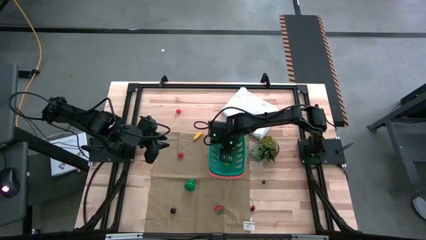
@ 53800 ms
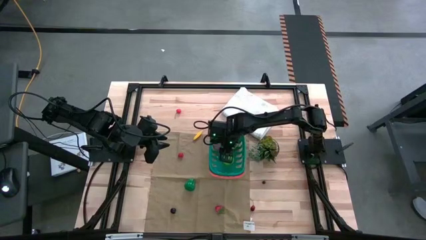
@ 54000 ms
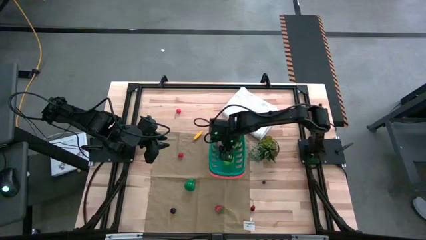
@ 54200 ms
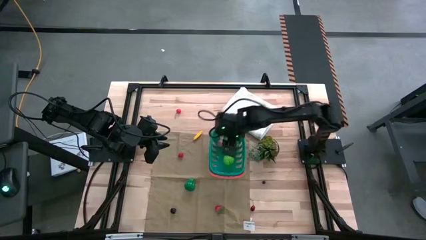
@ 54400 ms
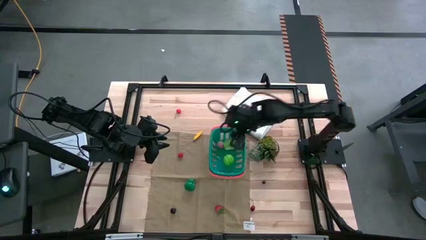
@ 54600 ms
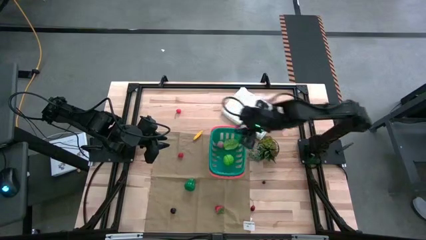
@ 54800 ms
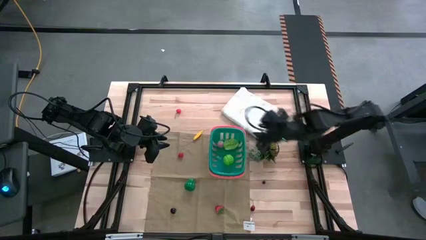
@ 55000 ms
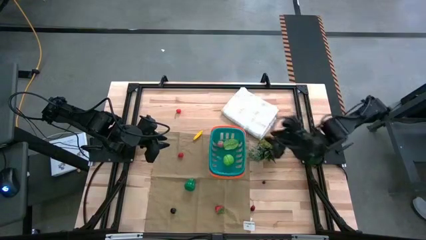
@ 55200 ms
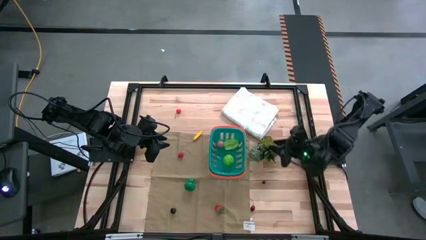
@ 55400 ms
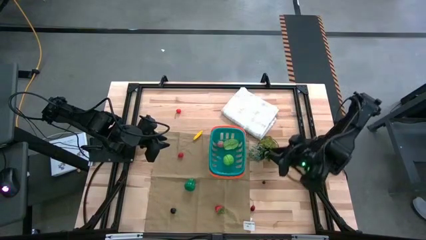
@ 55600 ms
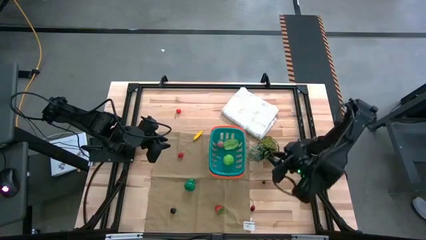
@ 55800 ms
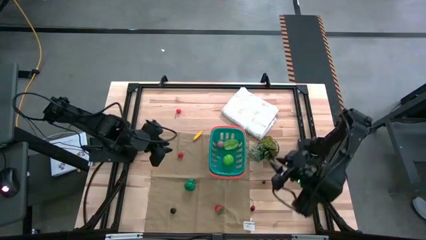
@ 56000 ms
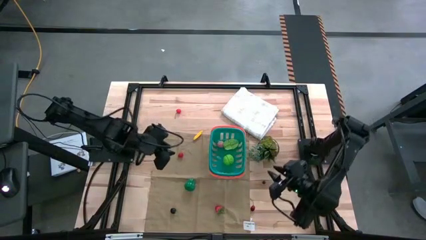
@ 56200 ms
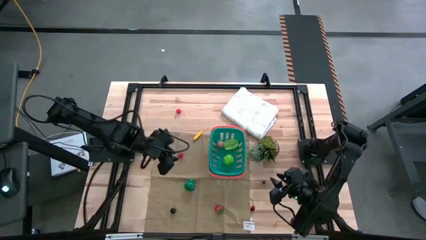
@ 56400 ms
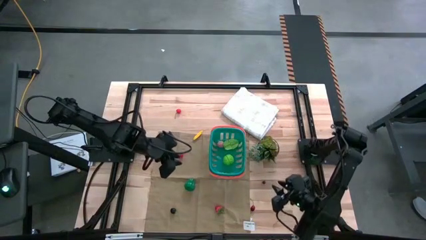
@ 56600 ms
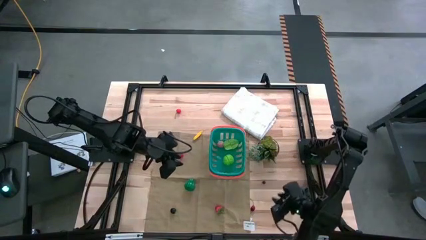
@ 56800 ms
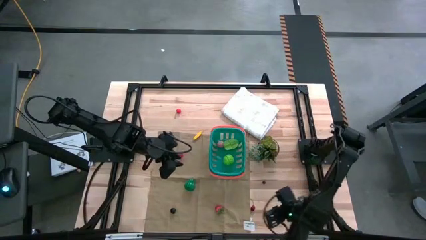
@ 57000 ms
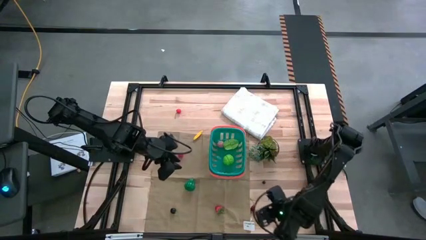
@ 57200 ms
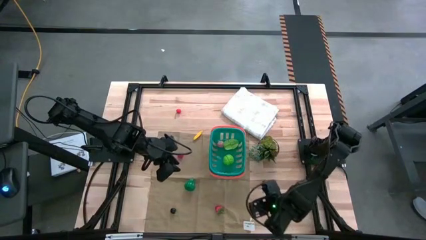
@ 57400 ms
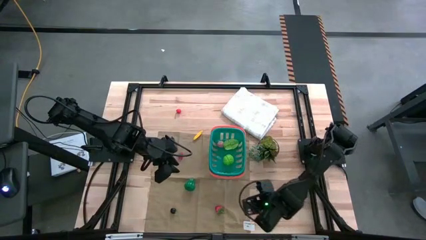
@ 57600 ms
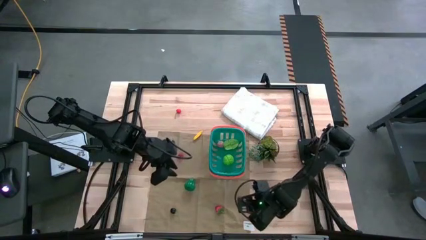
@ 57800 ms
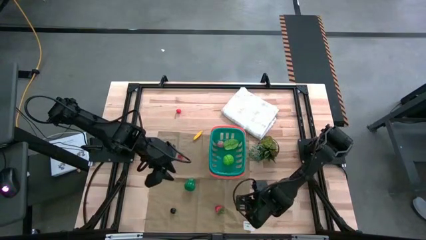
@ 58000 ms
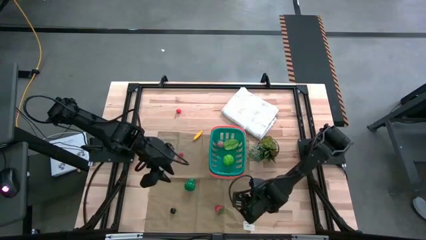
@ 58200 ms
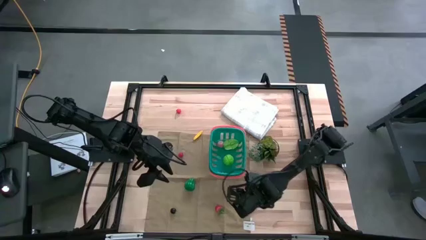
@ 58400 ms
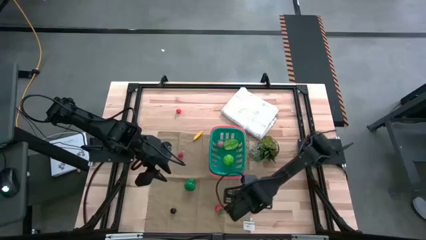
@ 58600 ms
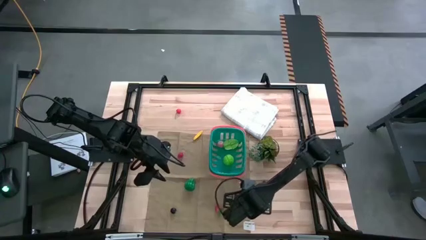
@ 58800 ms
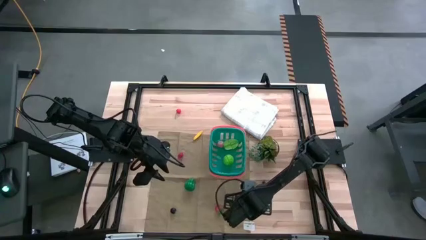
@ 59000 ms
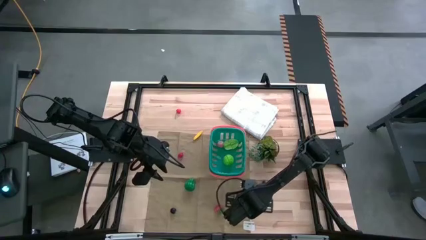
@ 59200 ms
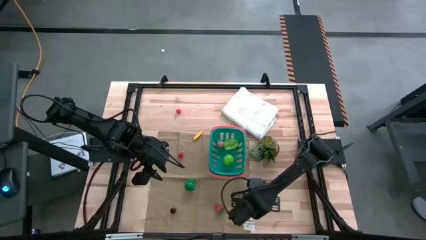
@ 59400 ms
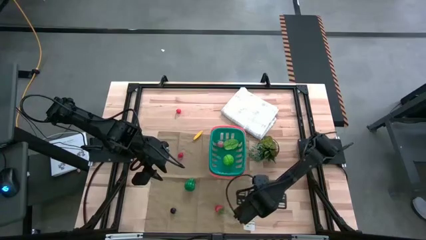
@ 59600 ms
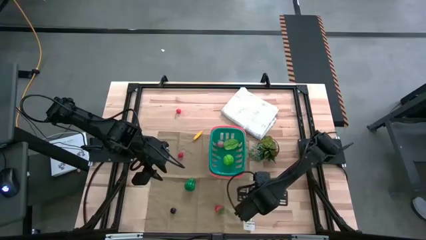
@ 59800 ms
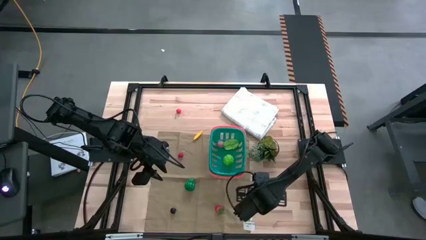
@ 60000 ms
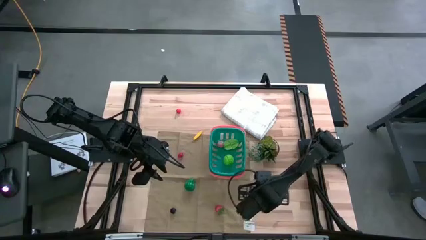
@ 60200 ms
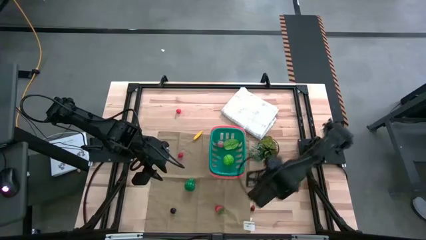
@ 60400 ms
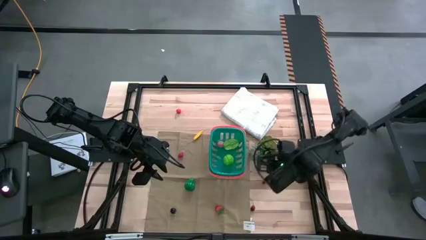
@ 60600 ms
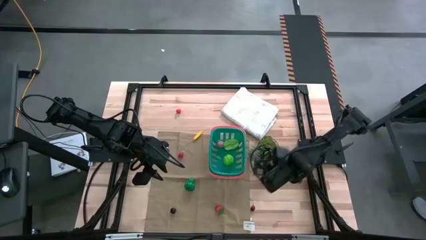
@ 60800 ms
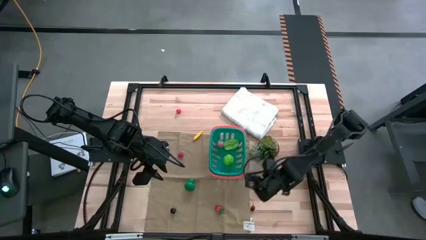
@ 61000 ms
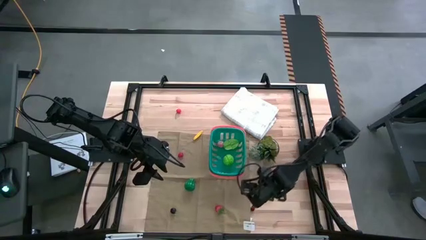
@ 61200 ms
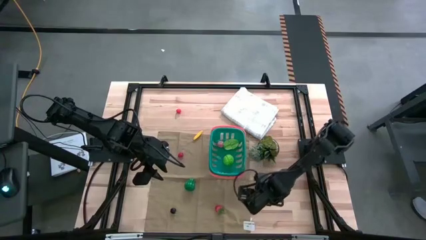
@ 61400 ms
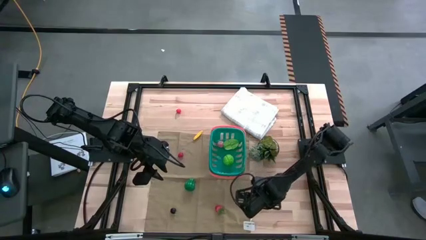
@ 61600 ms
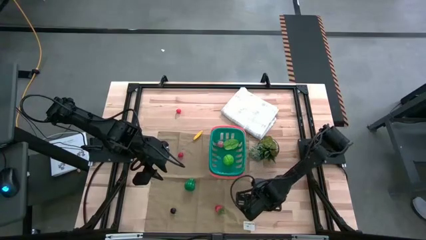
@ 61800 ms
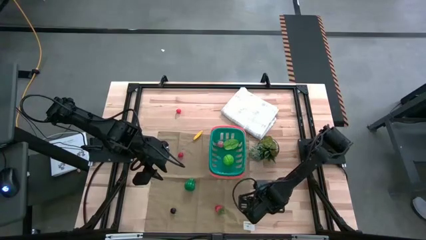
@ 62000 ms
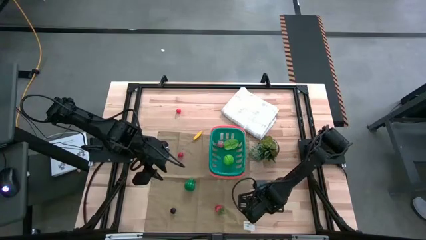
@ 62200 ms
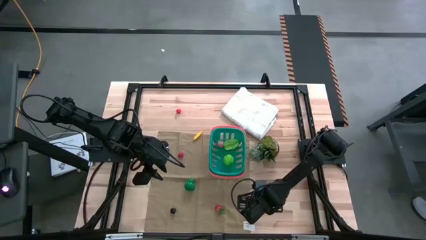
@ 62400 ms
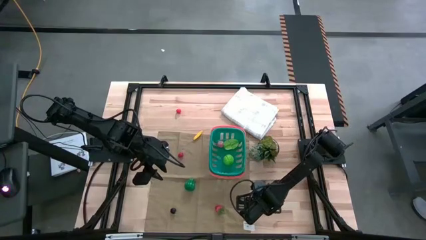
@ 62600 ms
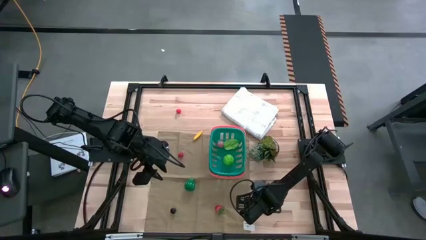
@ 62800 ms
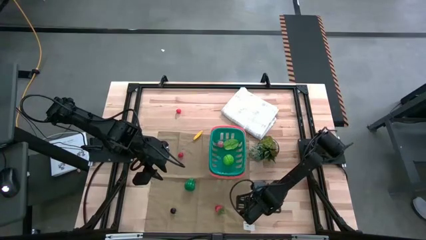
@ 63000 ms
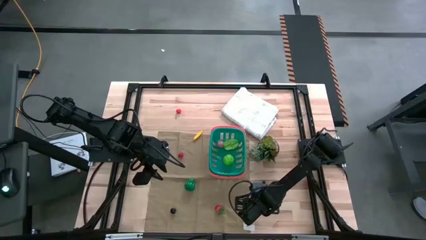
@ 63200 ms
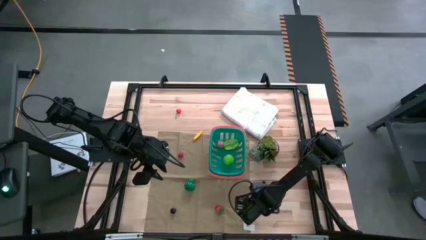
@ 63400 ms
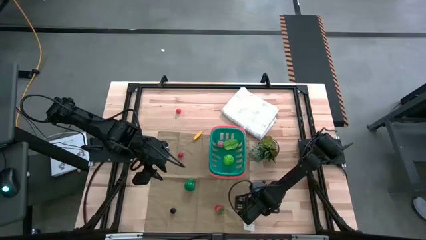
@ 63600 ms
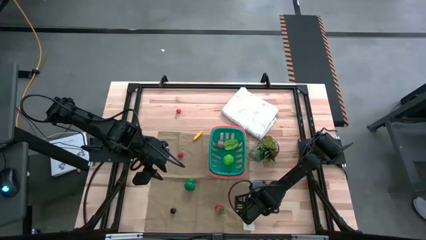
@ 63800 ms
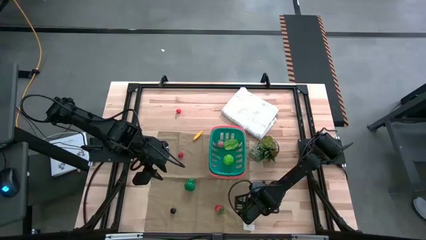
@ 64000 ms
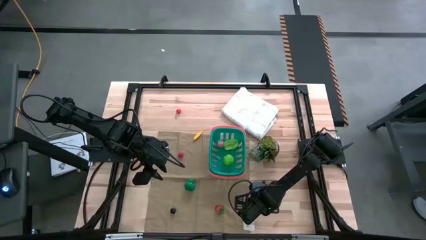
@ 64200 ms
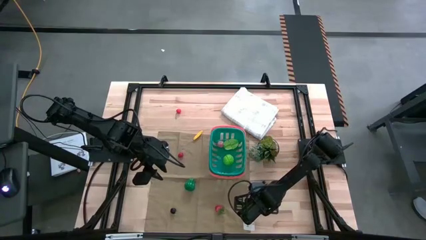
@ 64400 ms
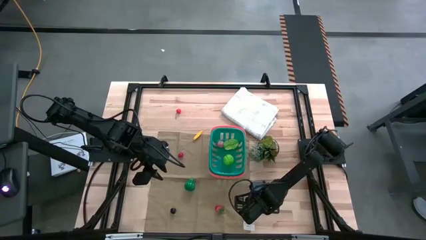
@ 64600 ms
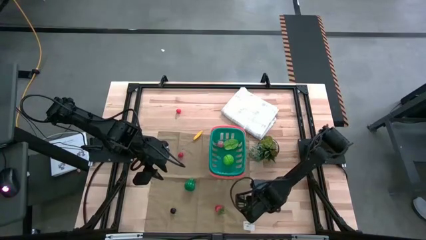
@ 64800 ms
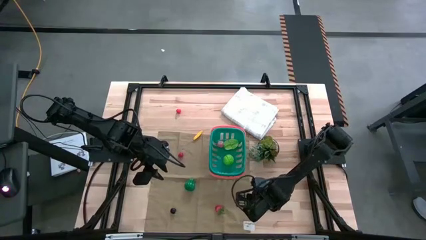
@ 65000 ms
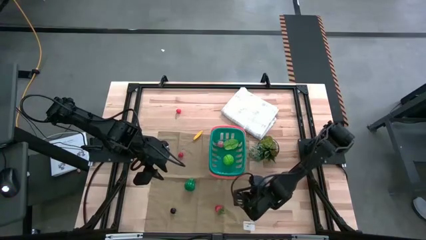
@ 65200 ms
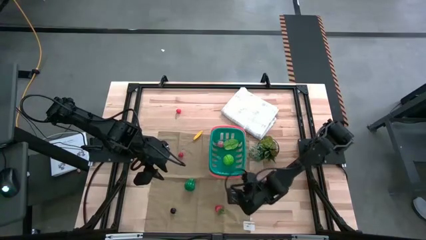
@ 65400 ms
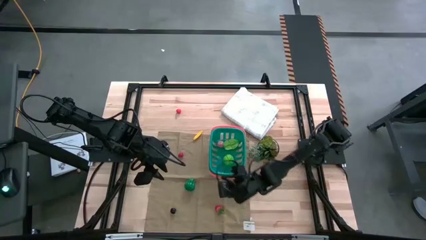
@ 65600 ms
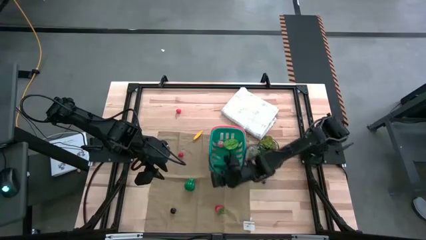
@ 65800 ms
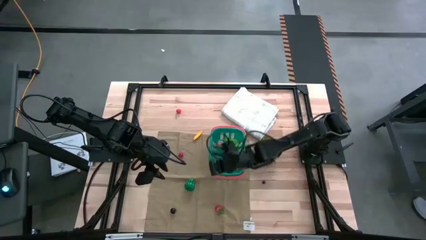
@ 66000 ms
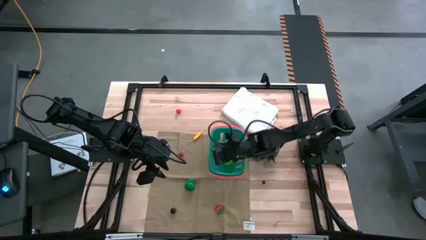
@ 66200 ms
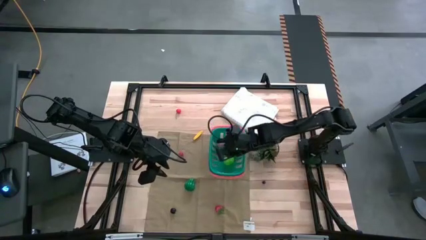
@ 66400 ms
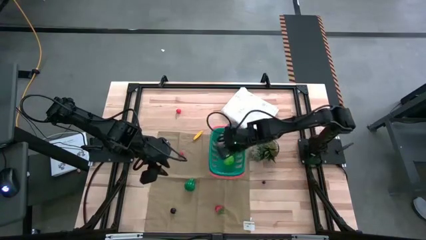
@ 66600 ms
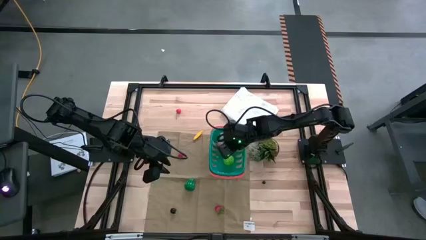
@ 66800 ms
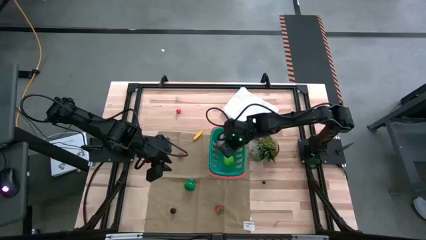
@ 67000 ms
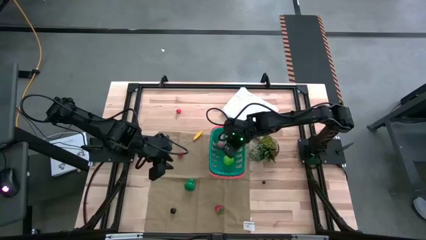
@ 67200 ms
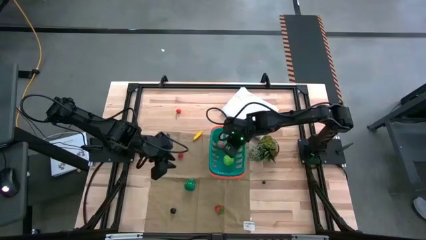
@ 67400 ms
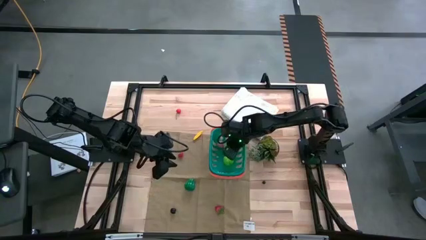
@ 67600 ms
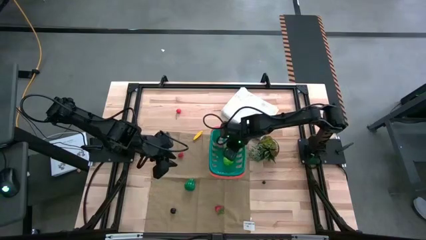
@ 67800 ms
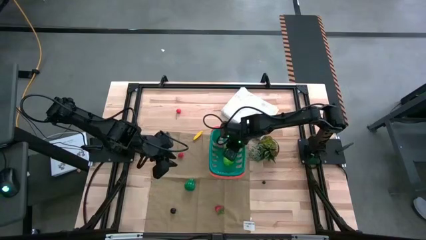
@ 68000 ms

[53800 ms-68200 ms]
Task: Pick and placing Produce into tupperware
Put the bottom red cherry into the blue basket
